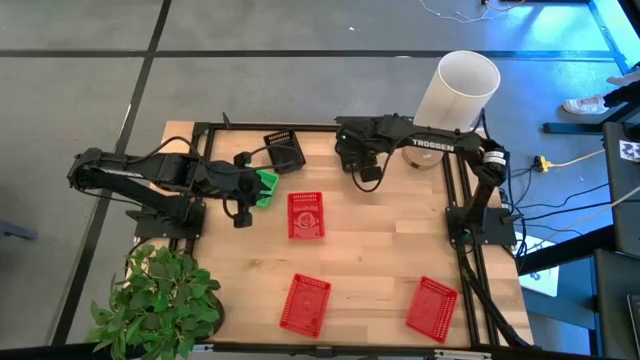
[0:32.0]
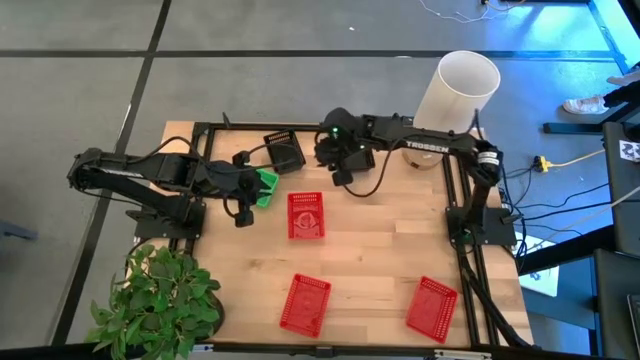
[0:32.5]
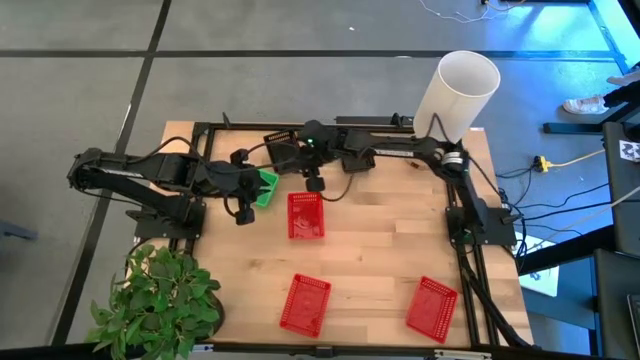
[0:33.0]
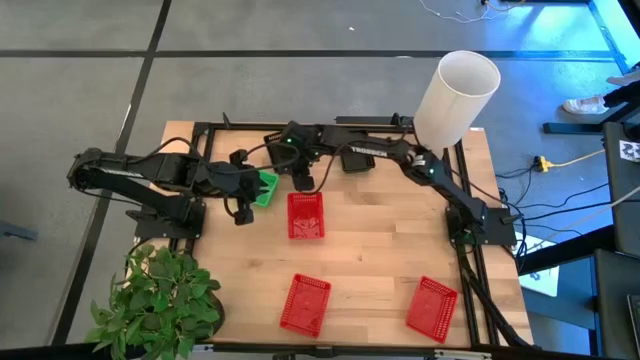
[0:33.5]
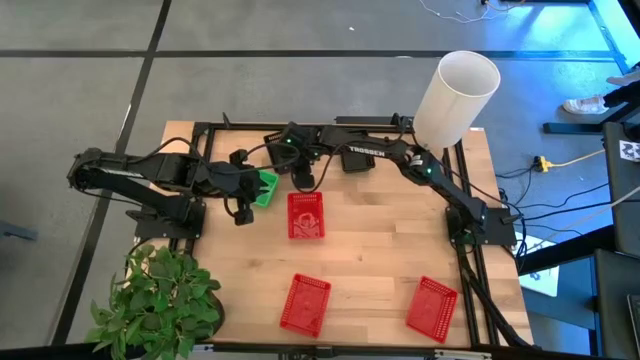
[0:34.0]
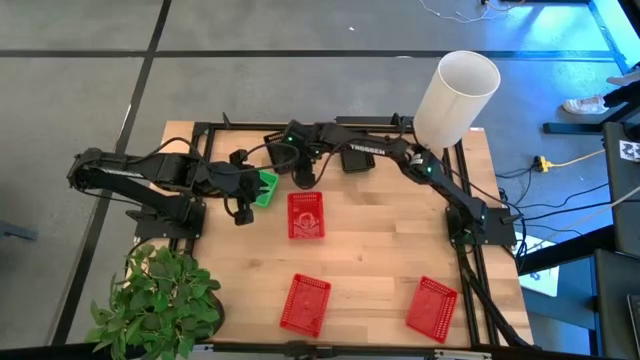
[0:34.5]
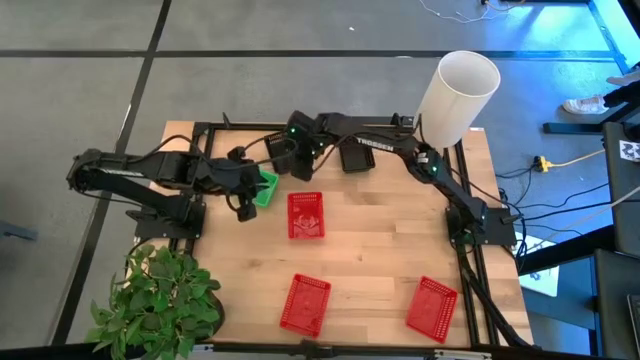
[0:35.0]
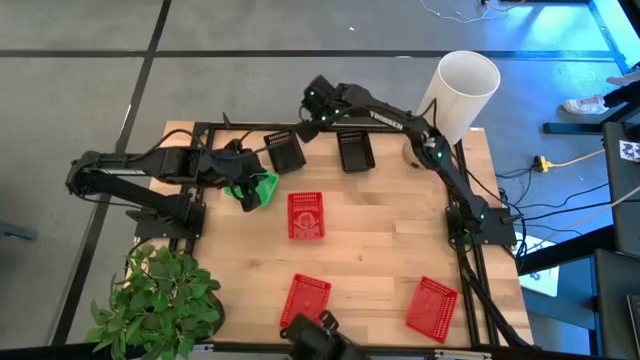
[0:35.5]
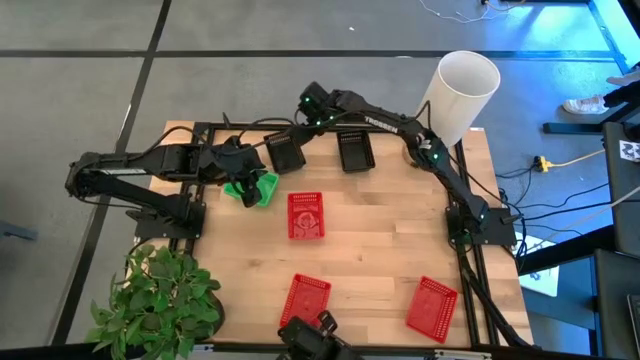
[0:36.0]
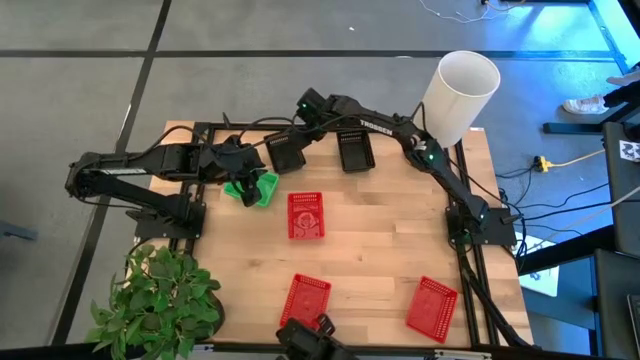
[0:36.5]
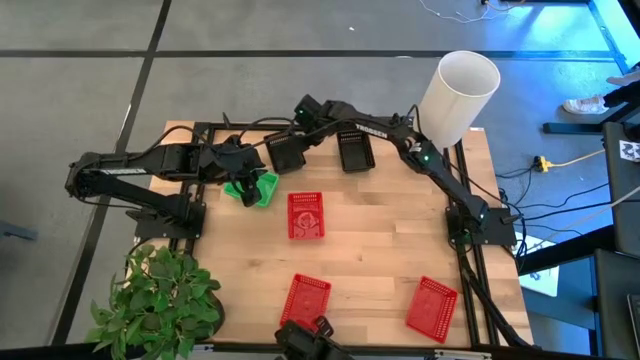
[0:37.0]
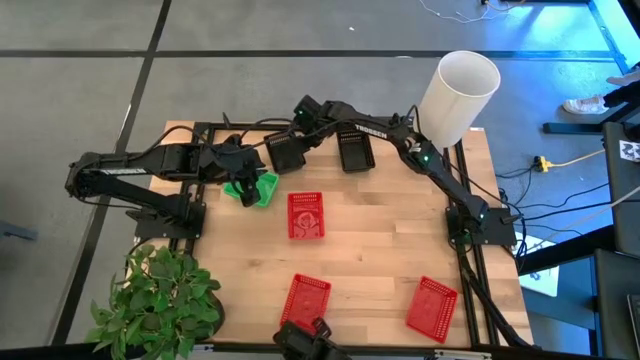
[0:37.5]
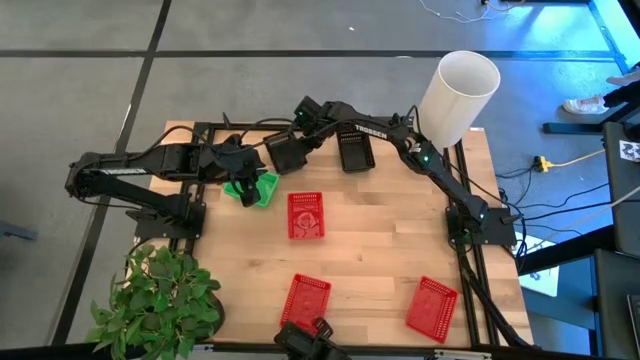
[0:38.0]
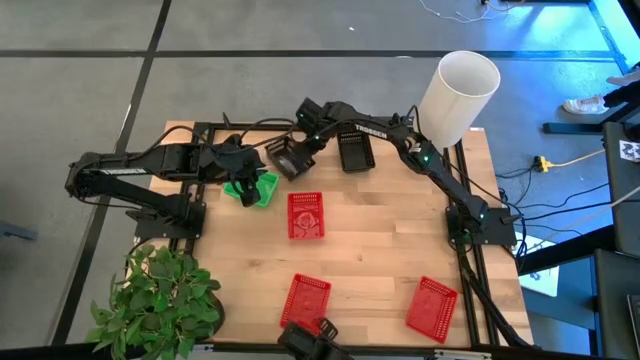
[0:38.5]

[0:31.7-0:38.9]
Stack the left black bin on the black bins

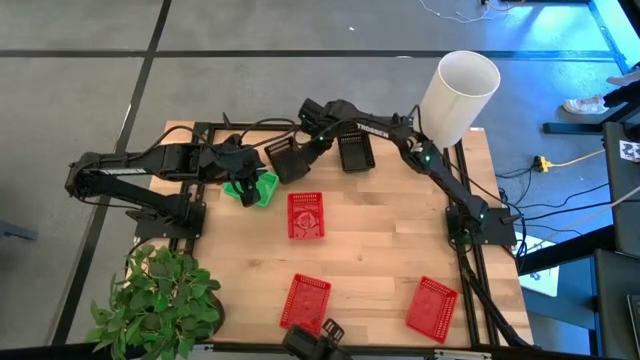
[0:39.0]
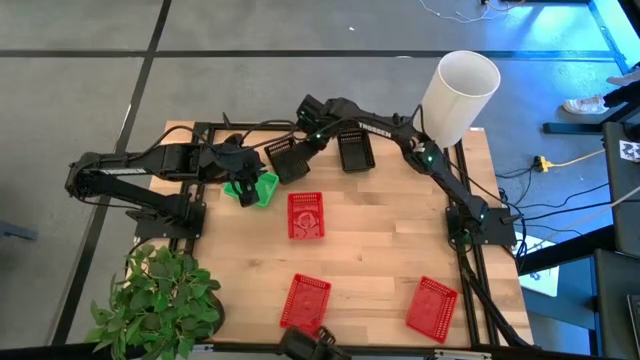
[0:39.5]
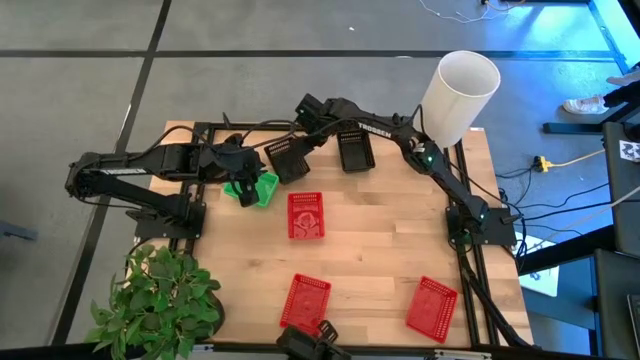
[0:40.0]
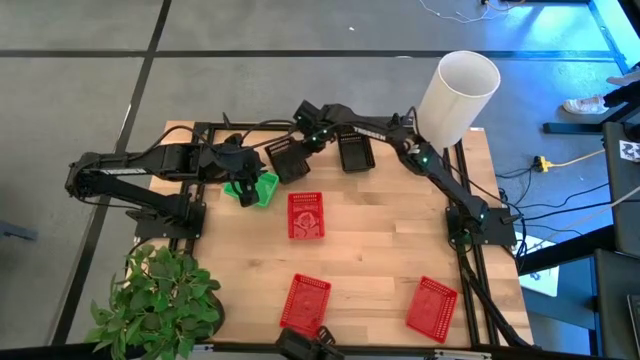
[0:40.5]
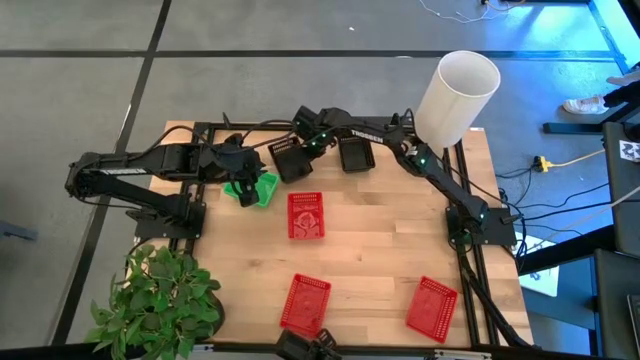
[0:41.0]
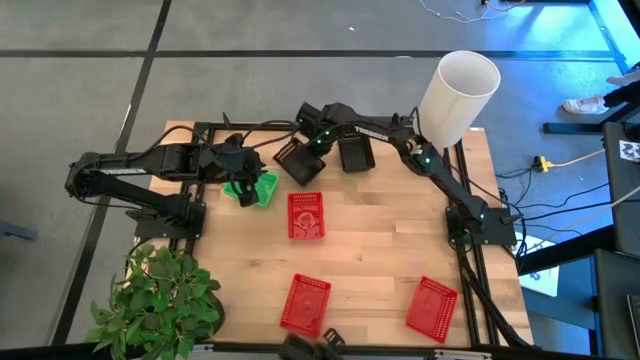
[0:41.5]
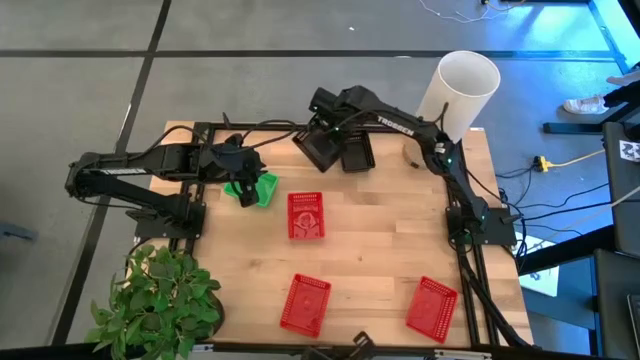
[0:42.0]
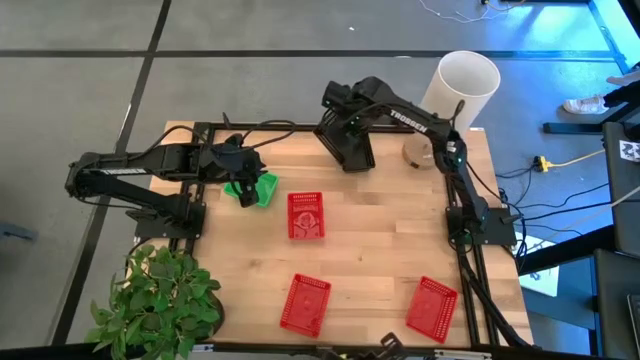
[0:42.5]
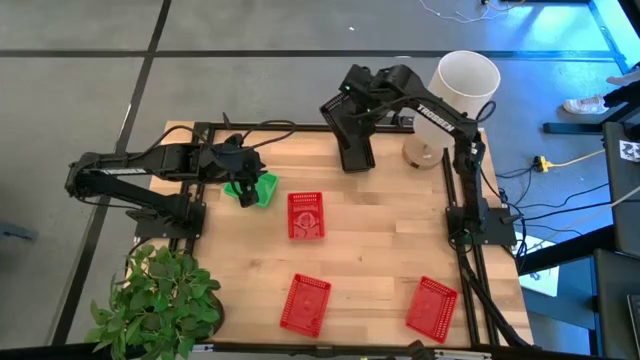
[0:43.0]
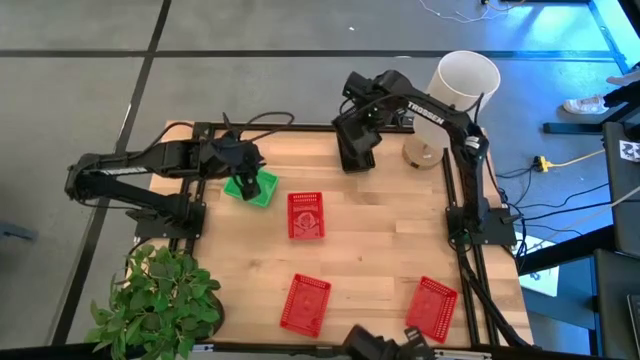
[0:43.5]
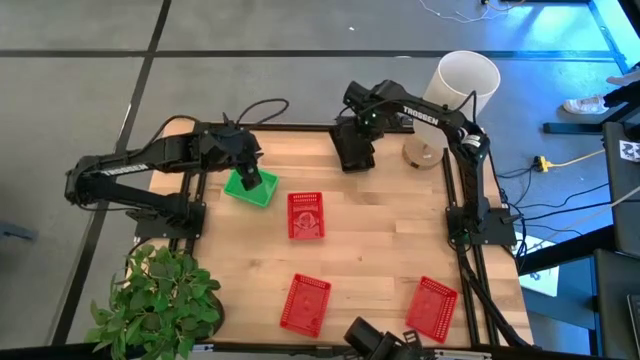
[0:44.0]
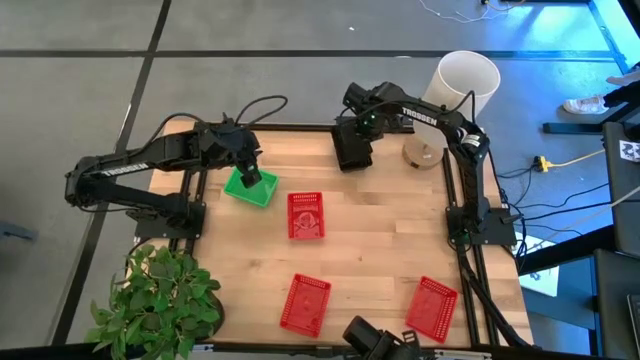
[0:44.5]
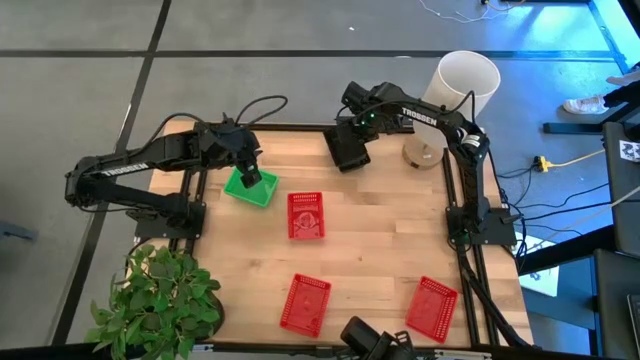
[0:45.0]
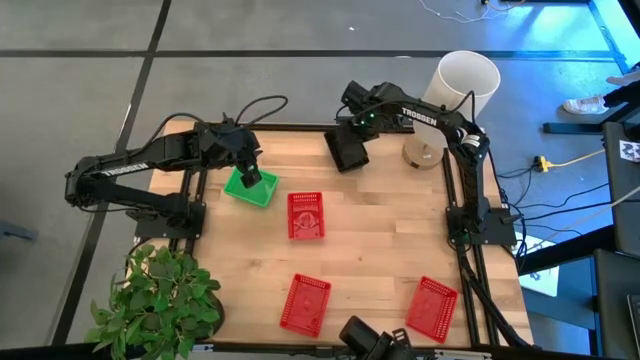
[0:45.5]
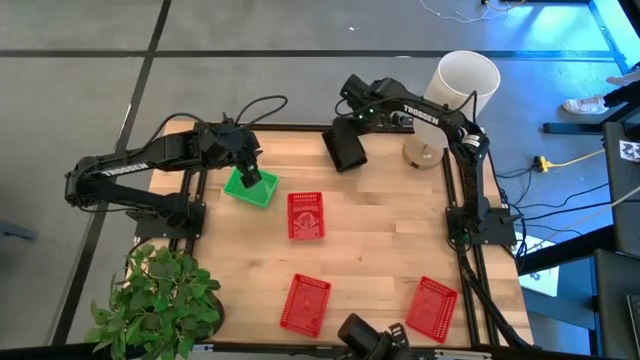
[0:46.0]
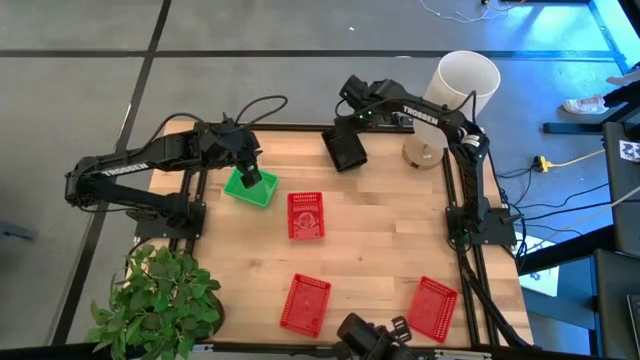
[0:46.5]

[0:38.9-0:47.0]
Stack the left black bin on the black bins

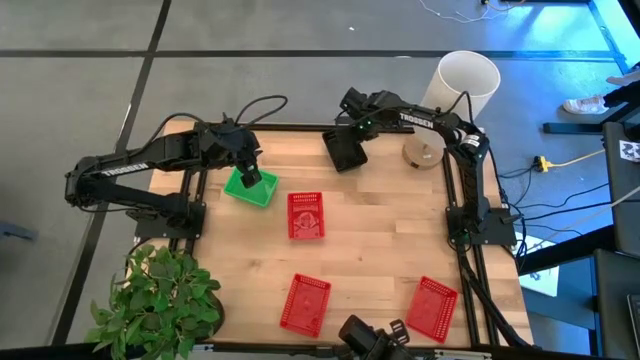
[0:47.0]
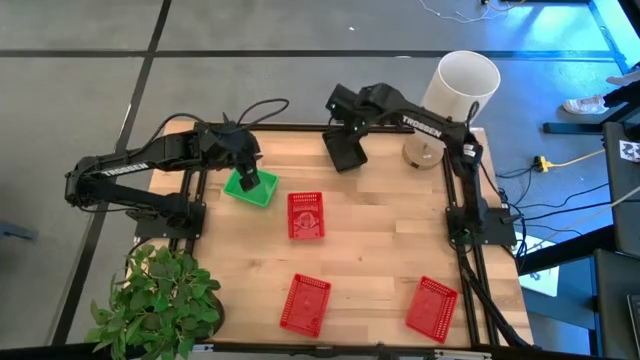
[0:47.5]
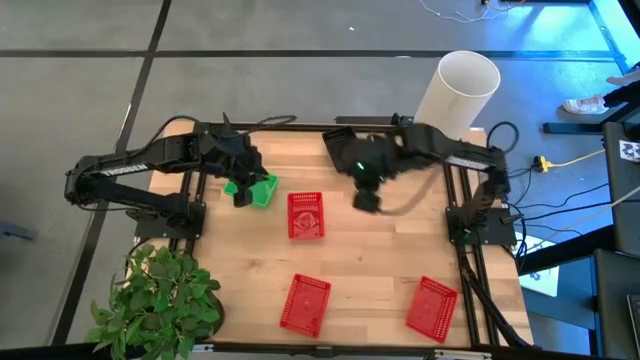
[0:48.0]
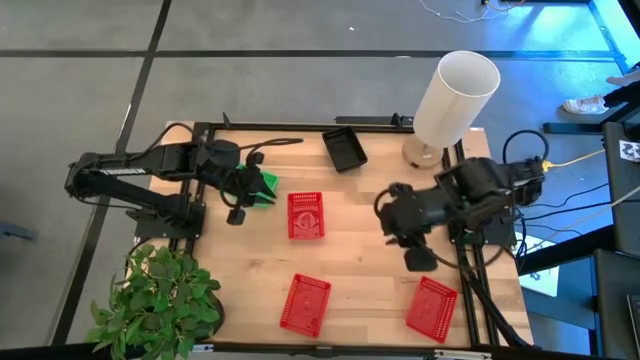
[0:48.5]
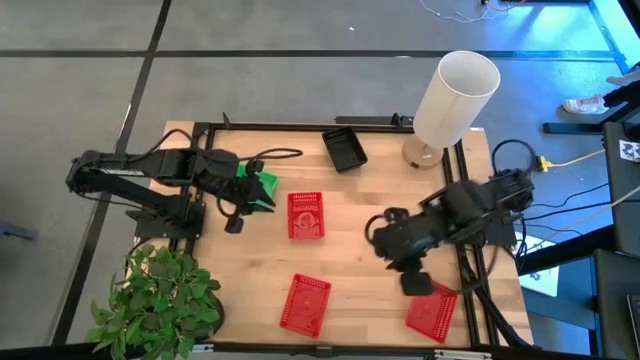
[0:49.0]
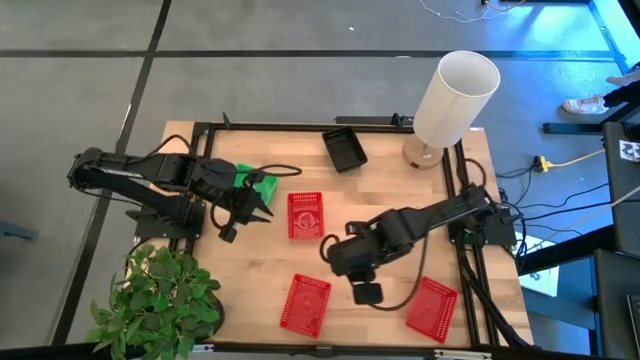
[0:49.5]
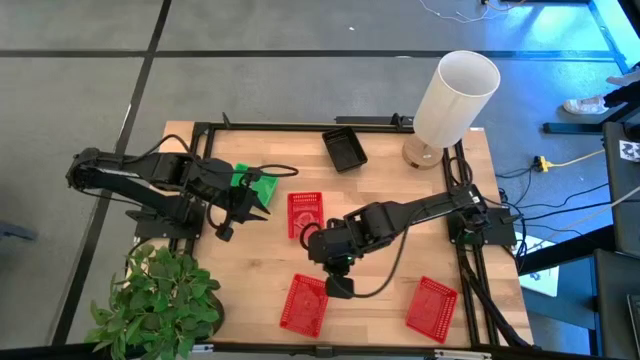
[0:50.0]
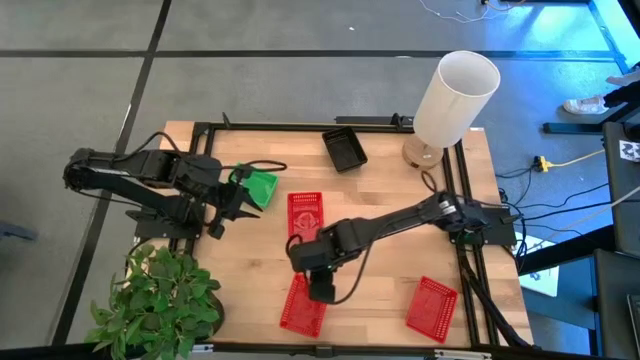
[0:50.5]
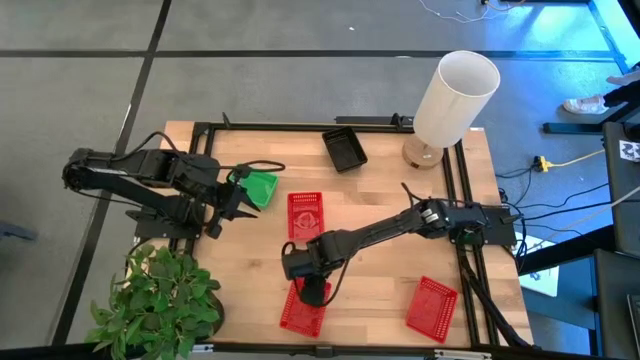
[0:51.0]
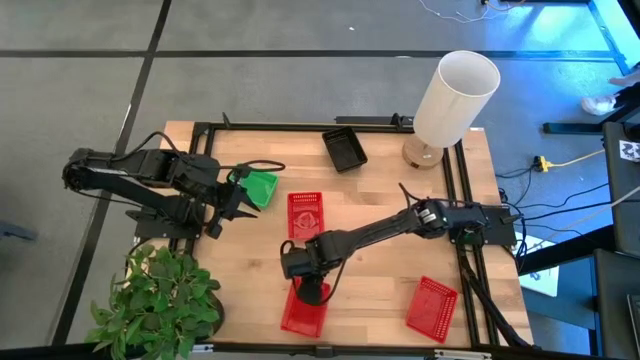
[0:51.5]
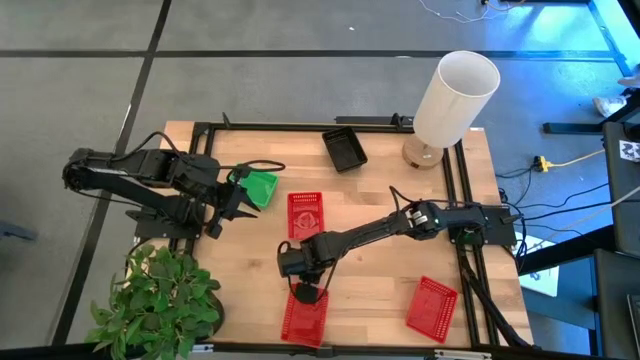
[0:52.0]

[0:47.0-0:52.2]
Stack the bottom left red bin on the top red bin
